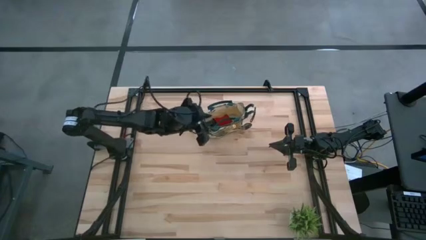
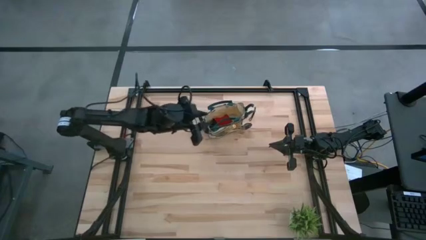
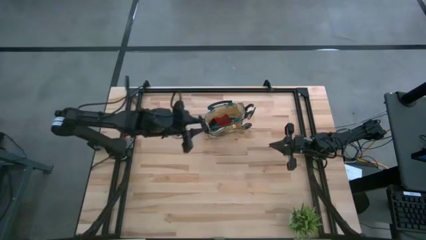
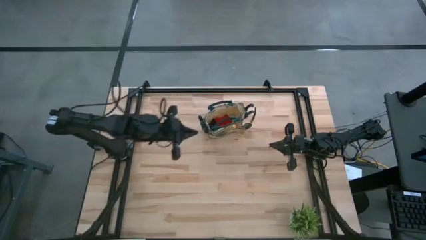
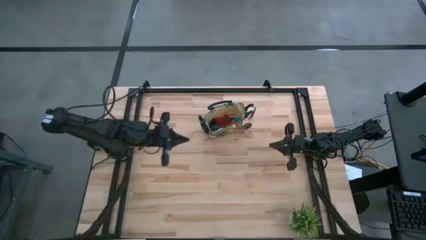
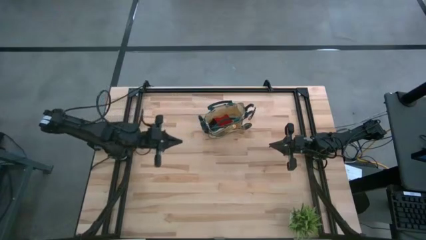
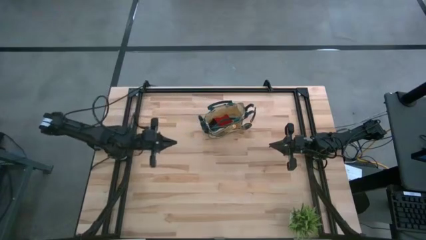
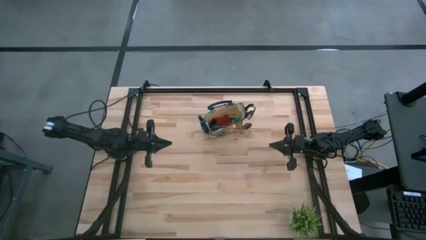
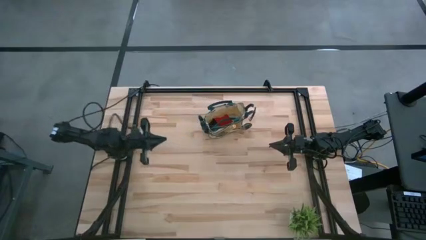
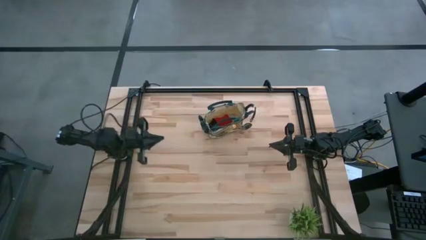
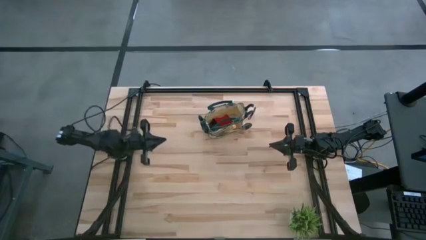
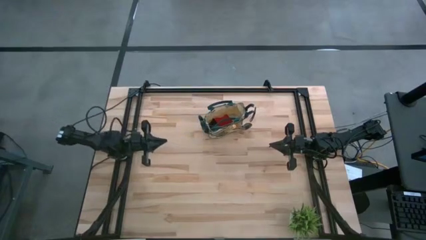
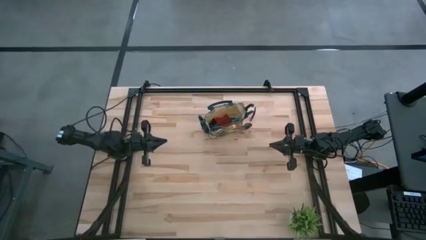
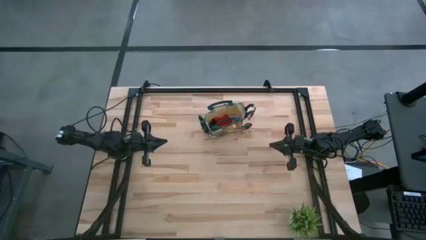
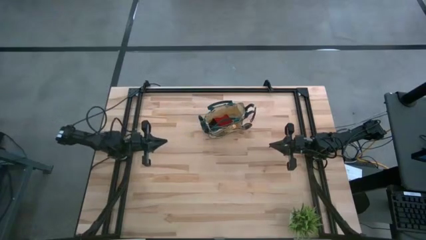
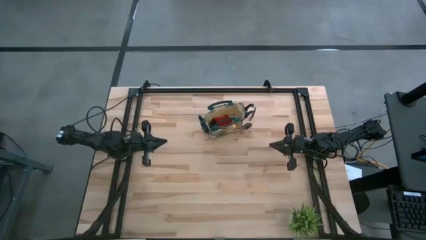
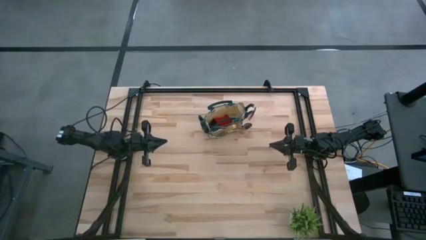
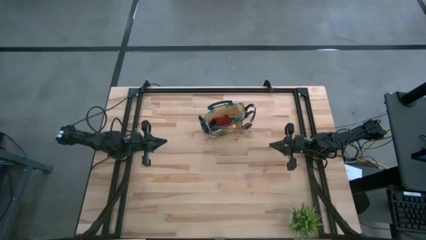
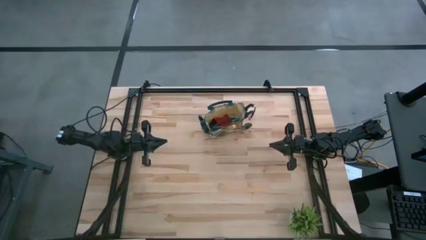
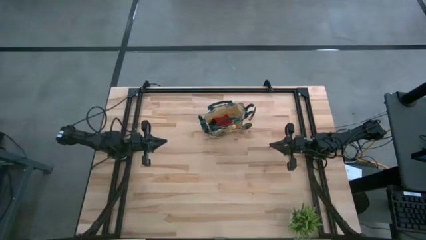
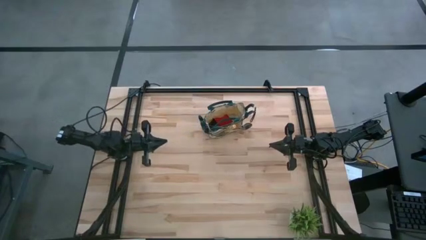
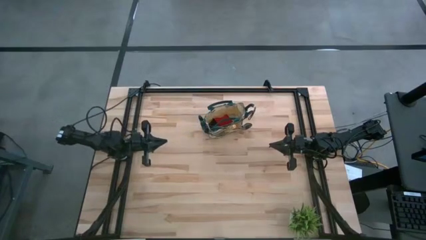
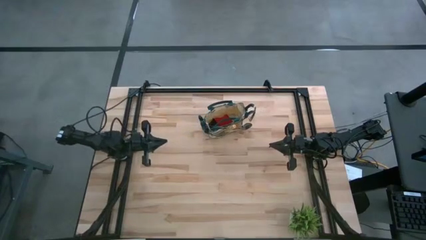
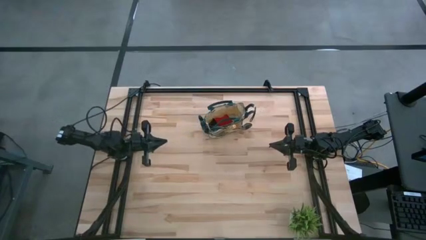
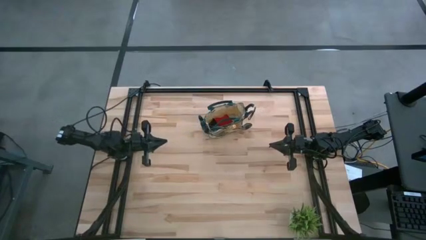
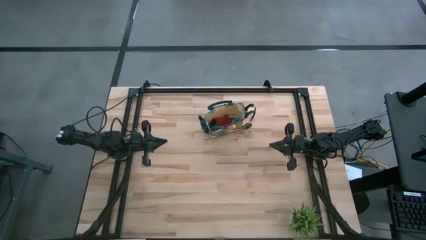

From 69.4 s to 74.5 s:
Task: Pick & Place Garden tools in Gardening bag
Return to Home Position

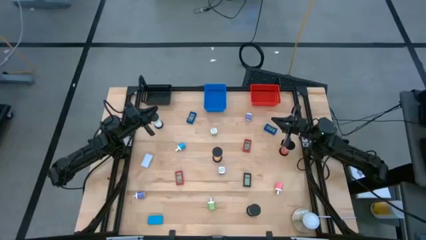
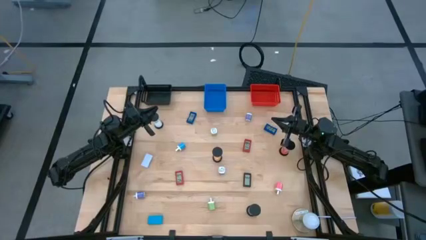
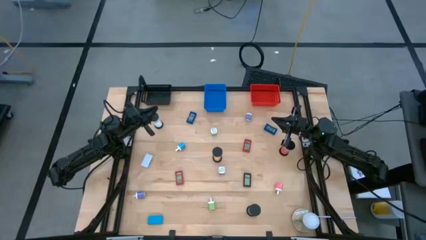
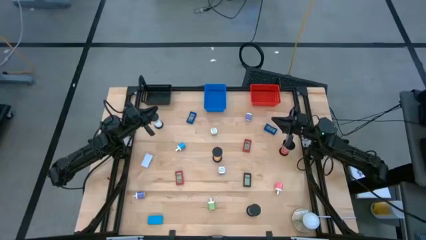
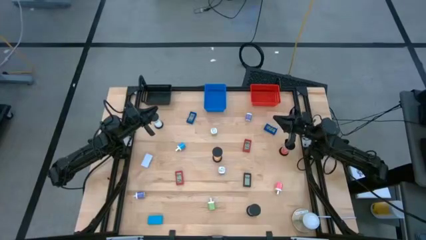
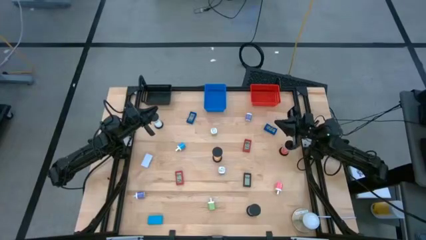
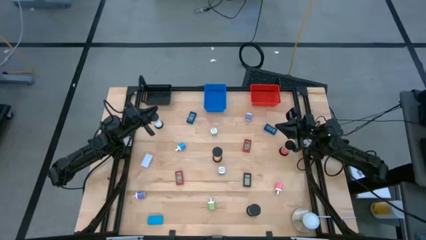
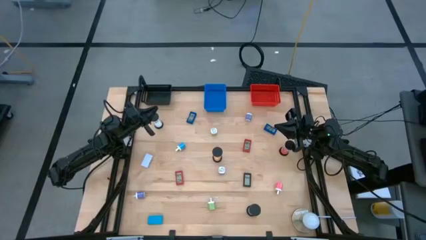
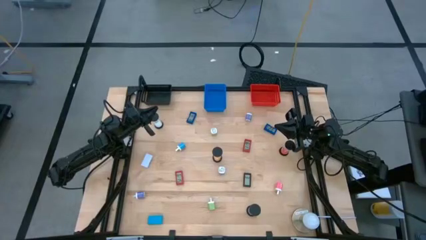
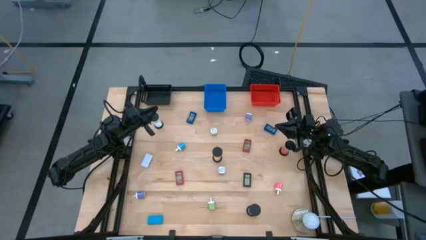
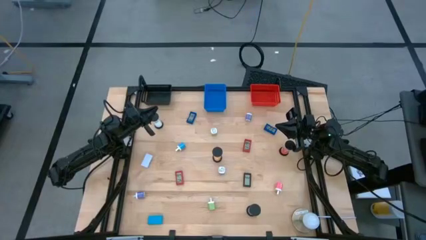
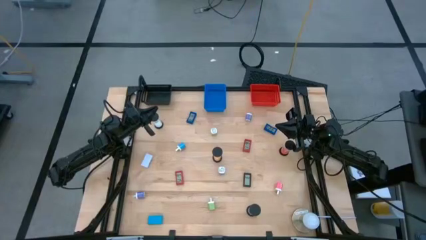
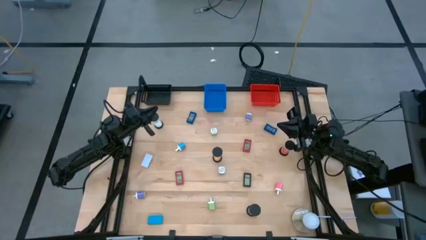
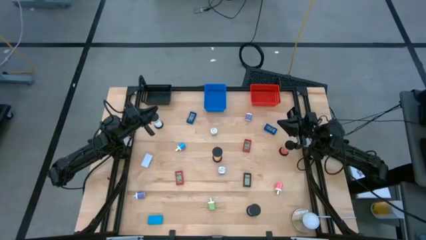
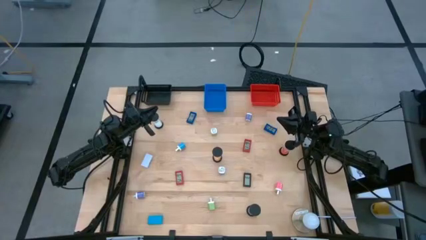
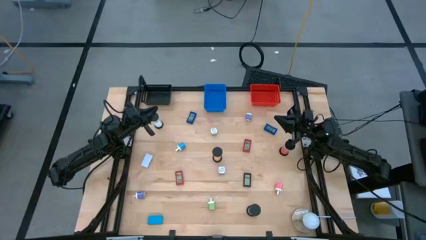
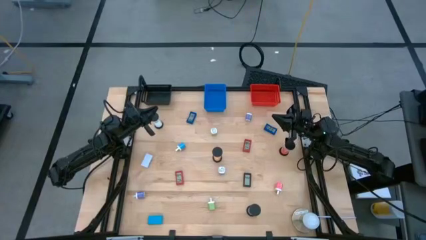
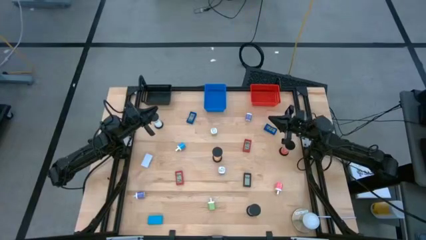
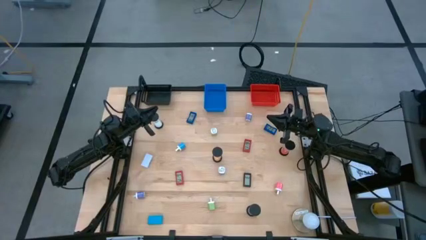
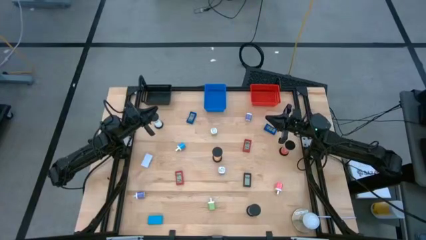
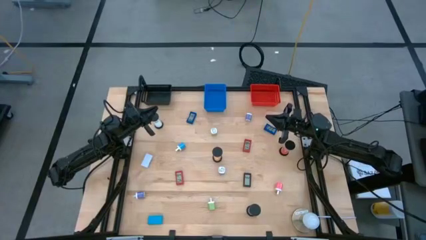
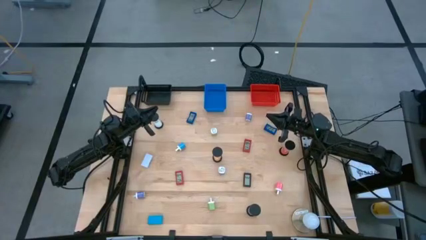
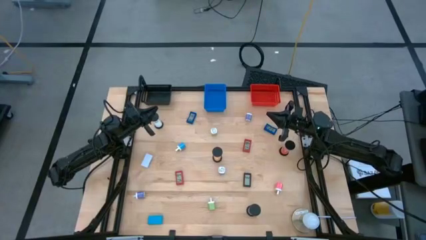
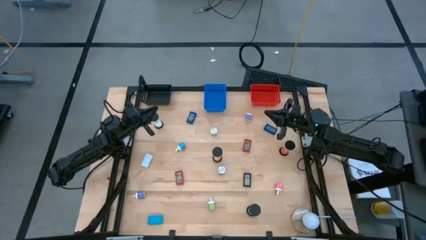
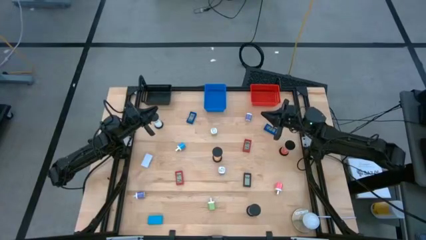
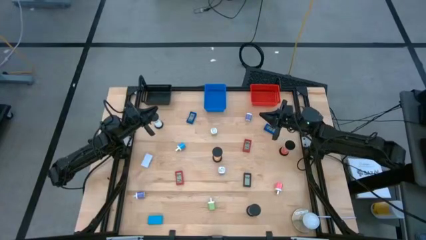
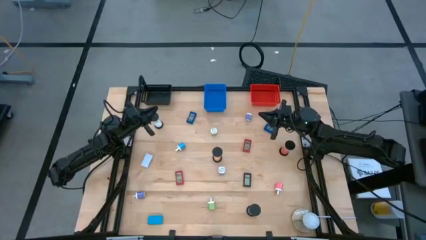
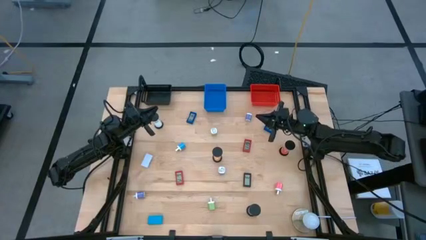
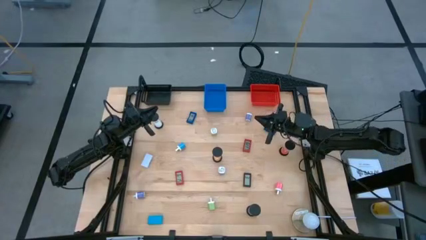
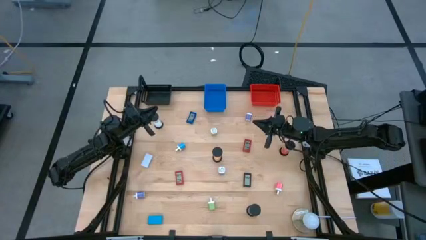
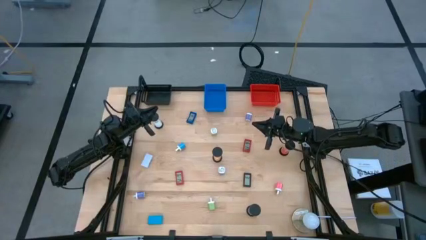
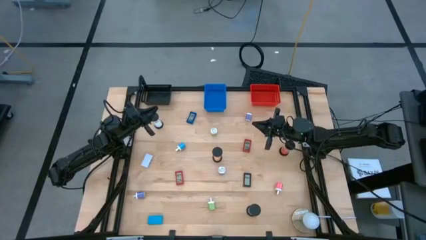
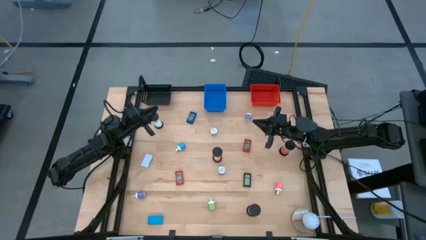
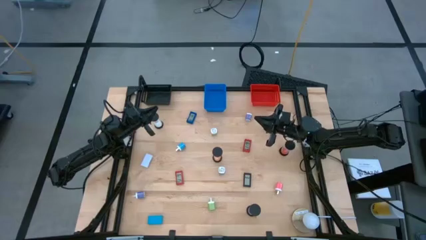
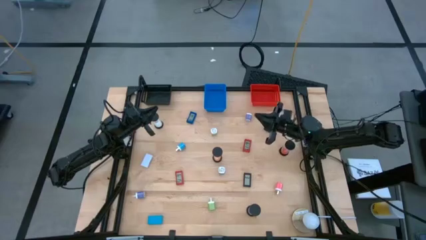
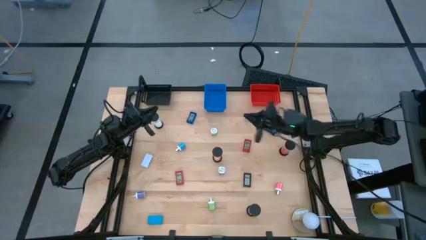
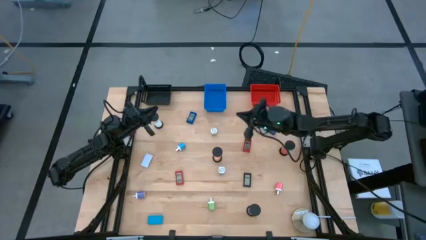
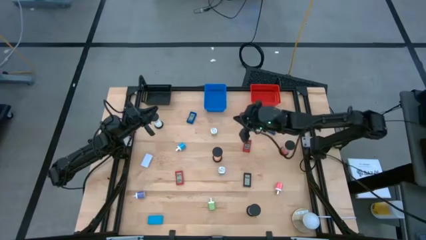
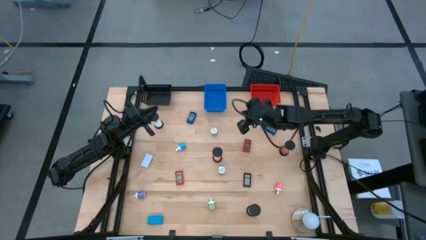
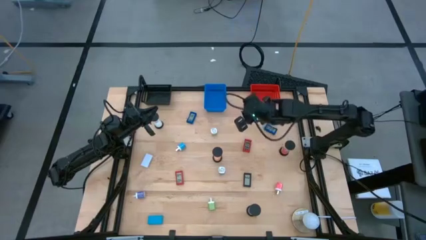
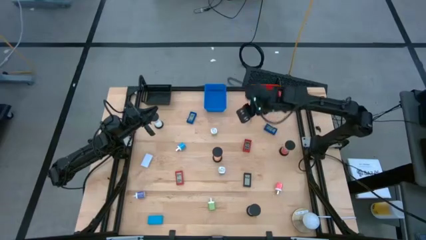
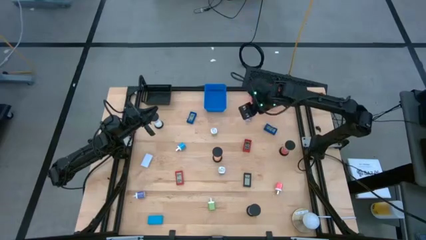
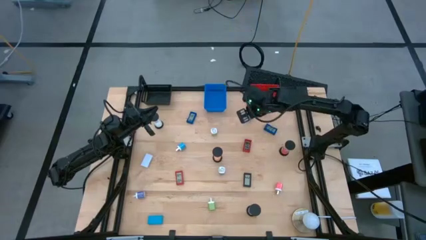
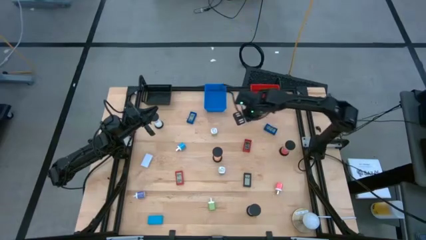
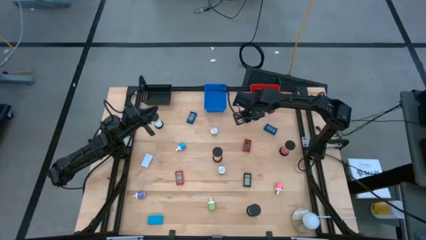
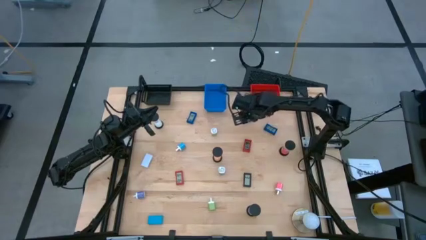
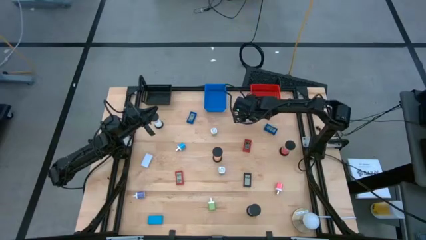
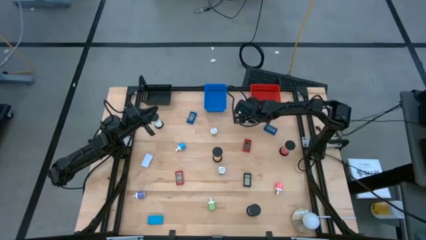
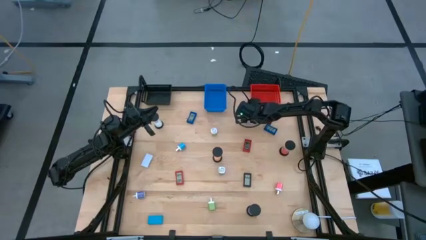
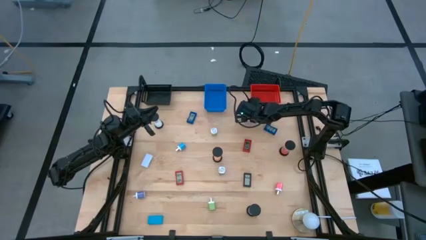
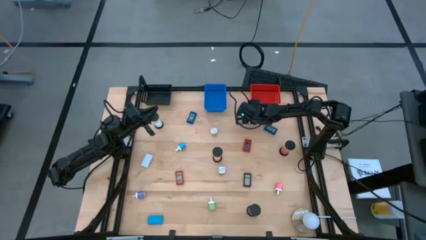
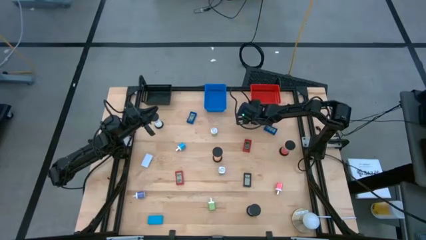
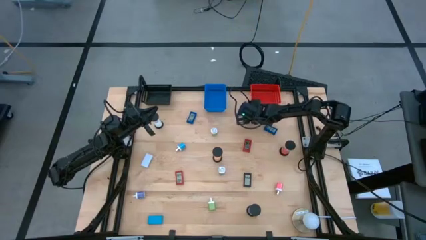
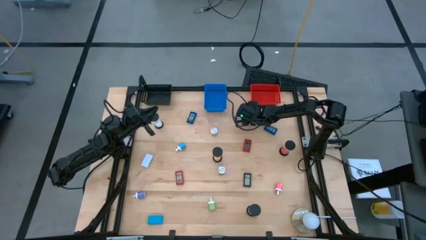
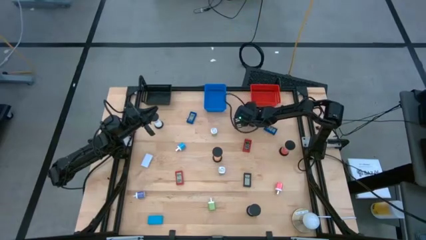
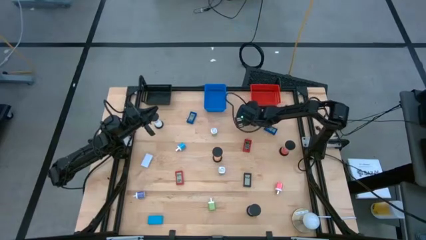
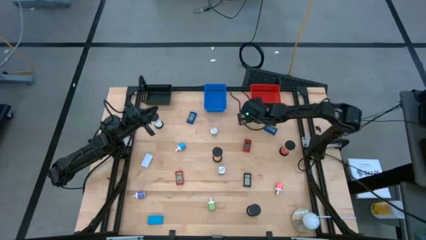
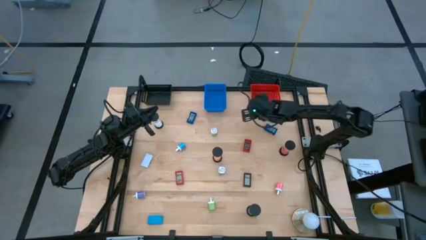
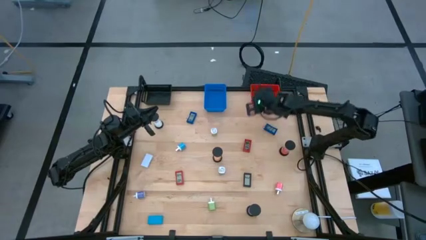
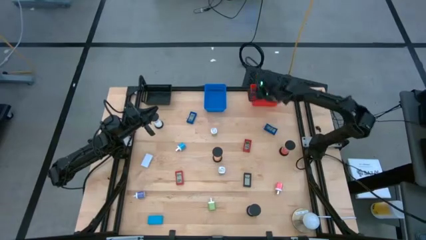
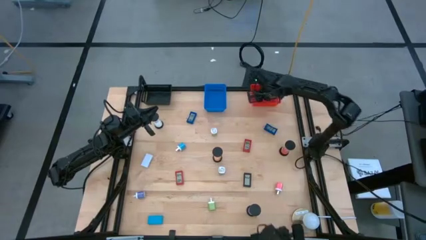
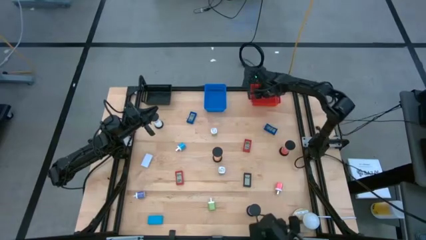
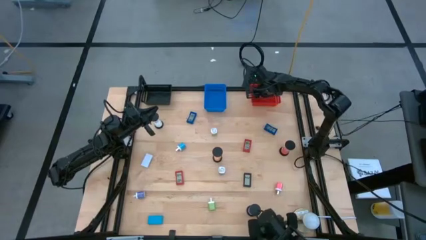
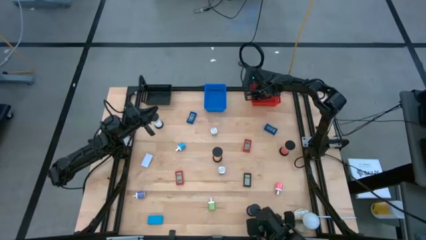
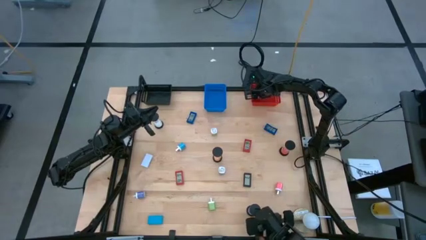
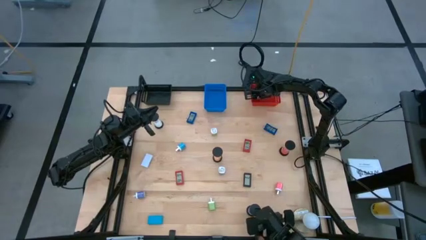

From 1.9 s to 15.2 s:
Task: Pick & Place Office items
Put the top purple charger adapter into the red basket
